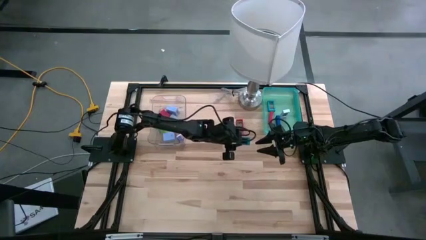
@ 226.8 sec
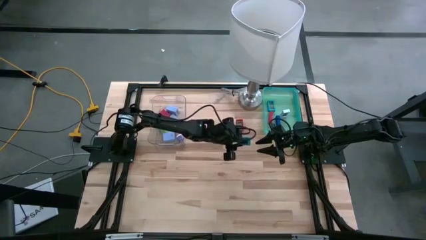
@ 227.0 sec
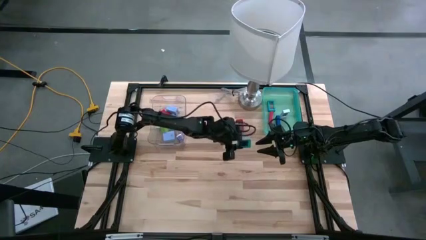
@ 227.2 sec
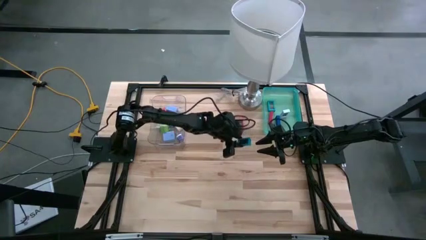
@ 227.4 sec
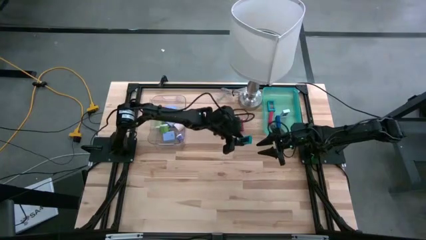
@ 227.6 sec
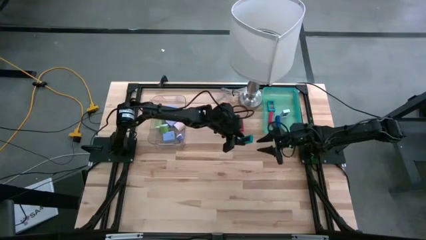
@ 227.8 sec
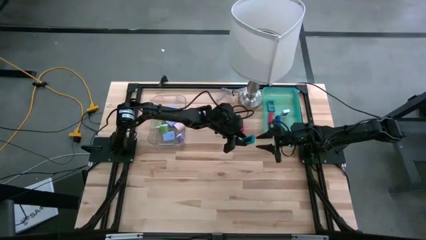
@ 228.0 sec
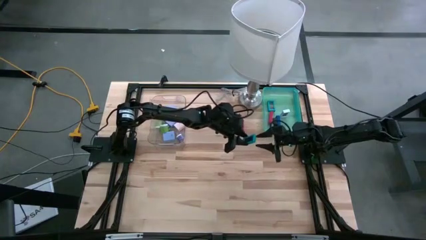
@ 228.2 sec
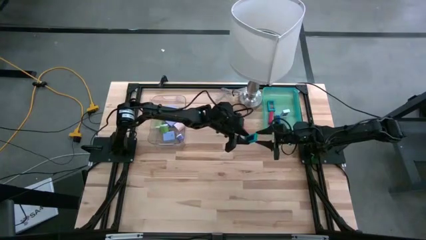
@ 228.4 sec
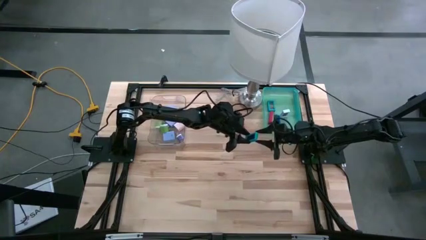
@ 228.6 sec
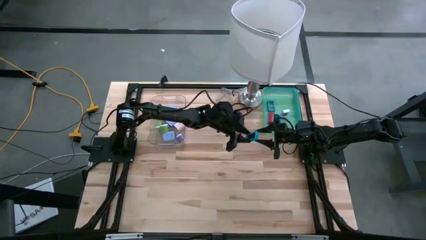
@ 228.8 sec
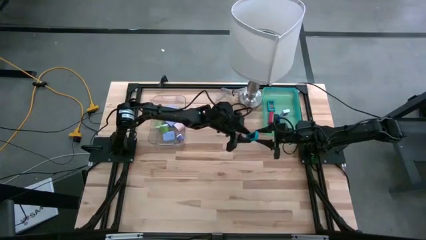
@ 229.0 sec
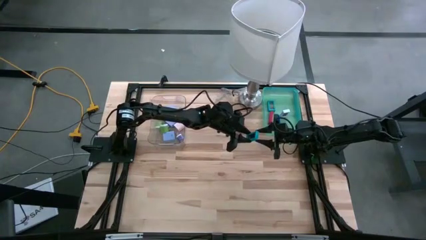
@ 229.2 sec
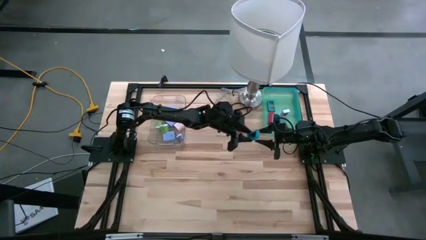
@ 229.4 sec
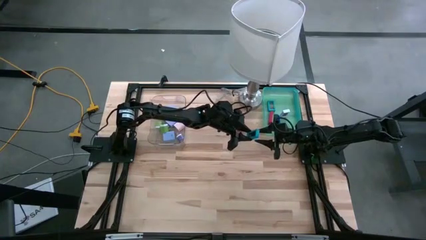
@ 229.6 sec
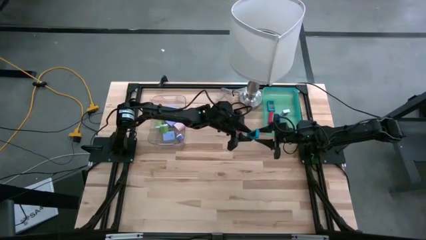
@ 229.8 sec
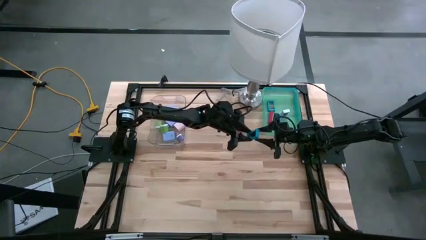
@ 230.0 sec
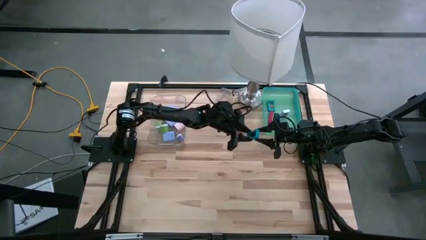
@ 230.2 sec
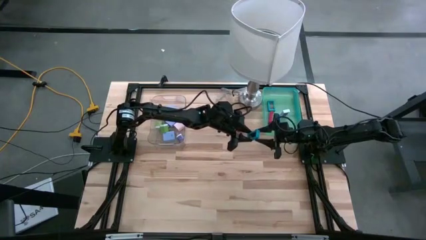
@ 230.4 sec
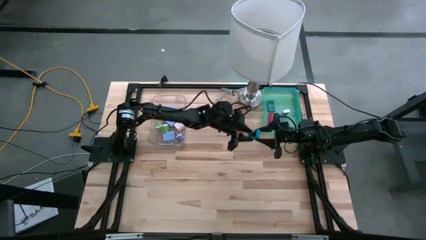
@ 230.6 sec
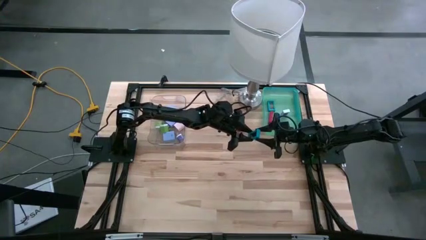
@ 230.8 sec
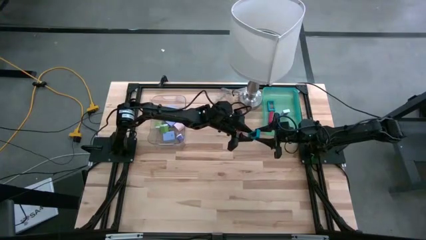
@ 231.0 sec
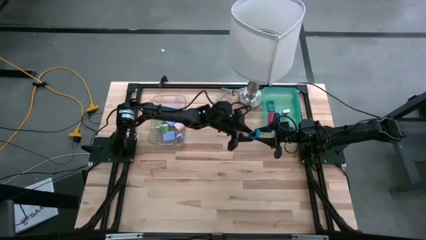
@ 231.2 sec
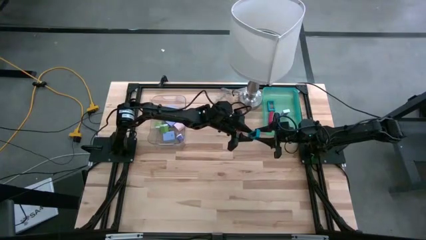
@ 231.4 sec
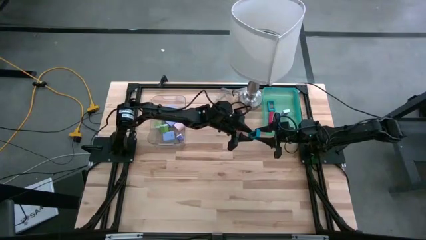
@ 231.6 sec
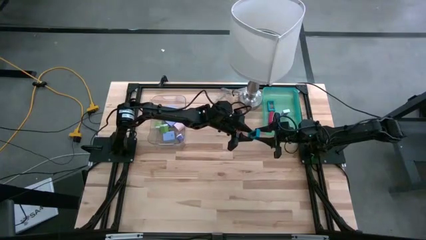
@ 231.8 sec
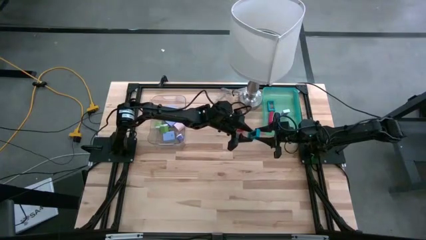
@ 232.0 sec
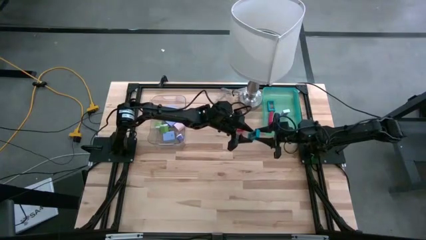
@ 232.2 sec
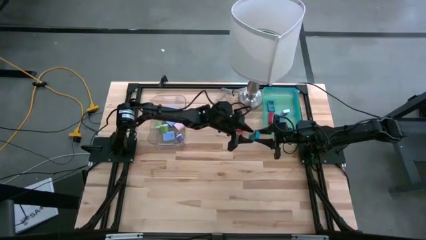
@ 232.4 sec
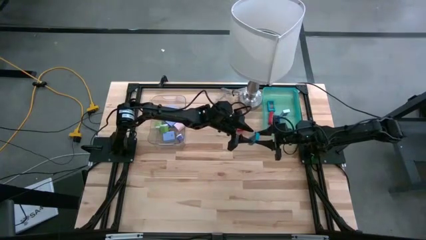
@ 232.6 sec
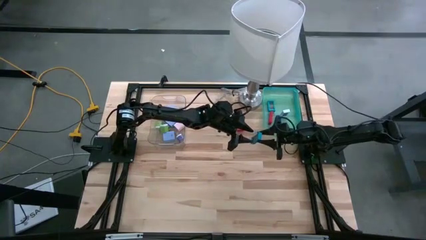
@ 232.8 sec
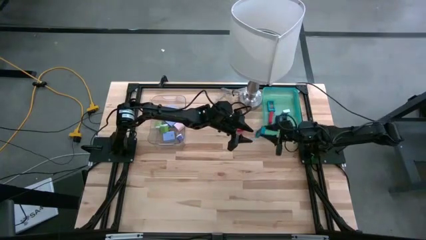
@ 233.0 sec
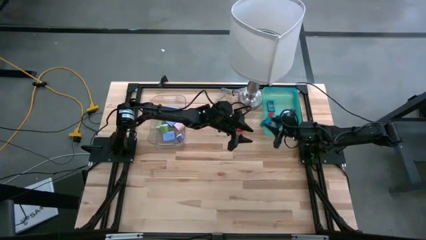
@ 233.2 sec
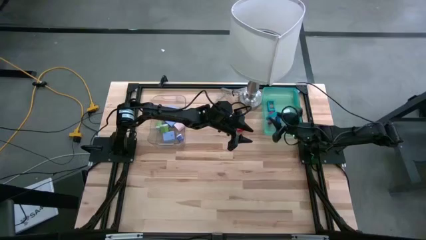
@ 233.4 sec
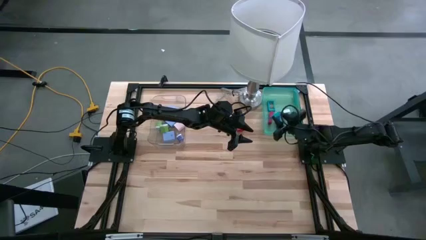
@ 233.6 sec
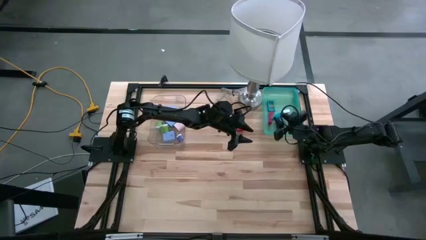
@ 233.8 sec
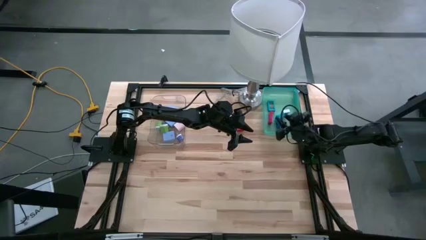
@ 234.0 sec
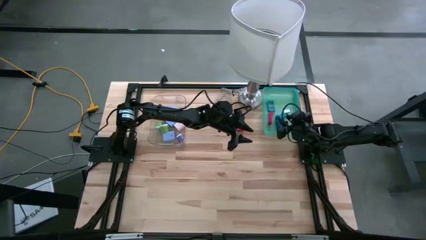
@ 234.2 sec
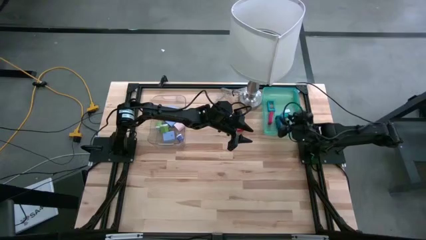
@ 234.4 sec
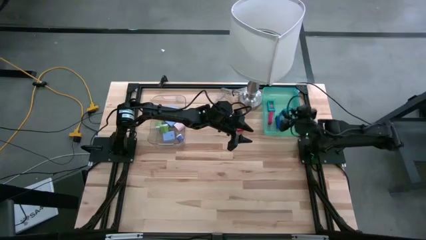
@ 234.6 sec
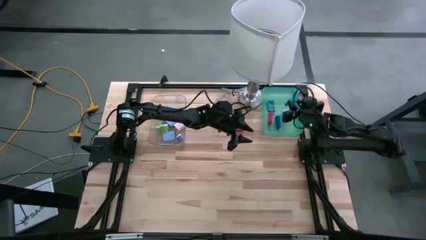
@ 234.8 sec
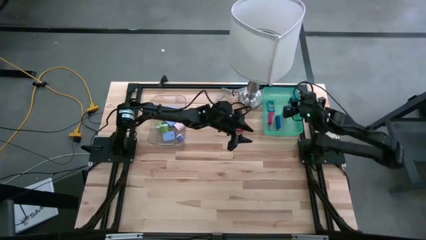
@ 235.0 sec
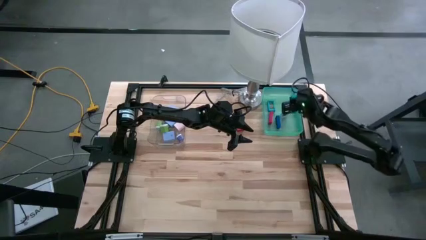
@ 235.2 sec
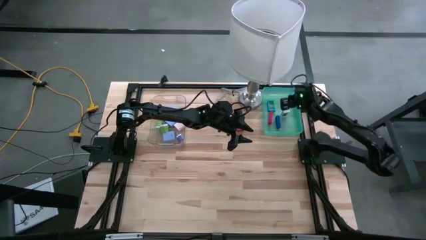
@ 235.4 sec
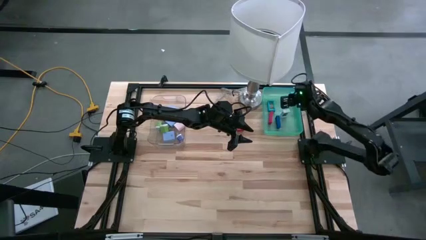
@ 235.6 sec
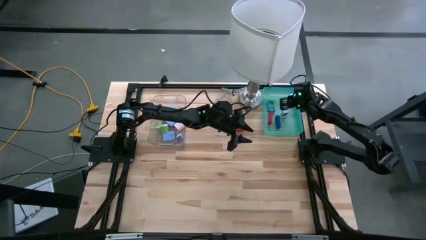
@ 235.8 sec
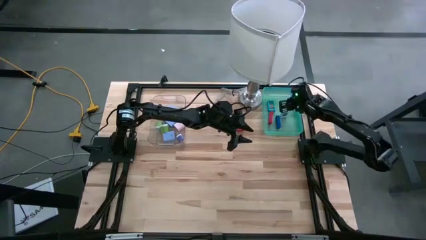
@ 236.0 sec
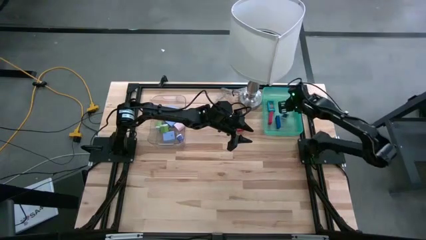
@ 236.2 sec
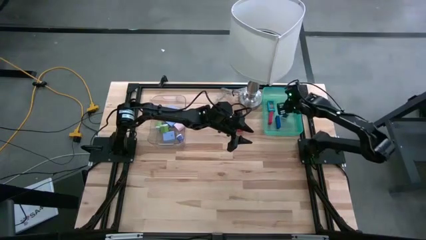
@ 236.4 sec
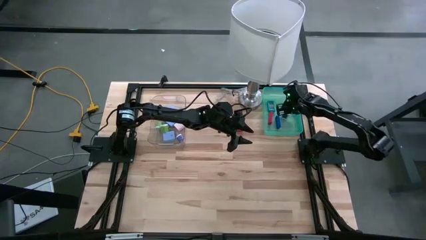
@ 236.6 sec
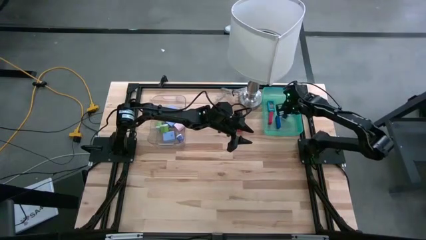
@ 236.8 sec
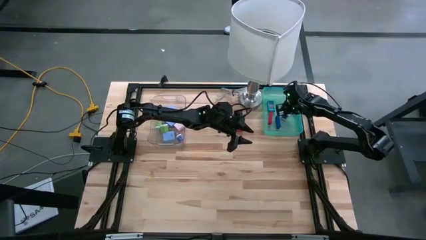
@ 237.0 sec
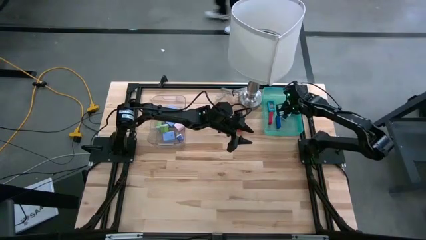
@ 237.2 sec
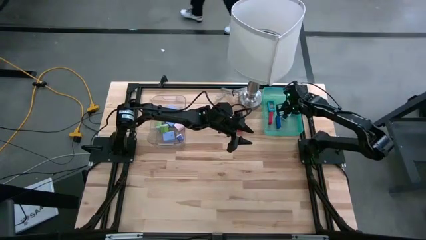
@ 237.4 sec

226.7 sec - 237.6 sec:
Task: Pick & Place Office items
Put the light blue mini digital clock into the light blue bin

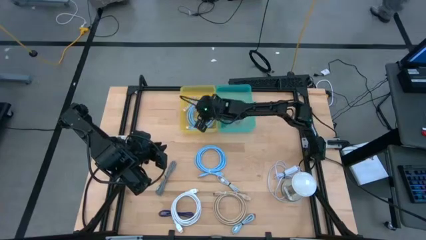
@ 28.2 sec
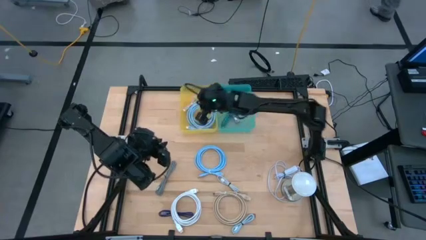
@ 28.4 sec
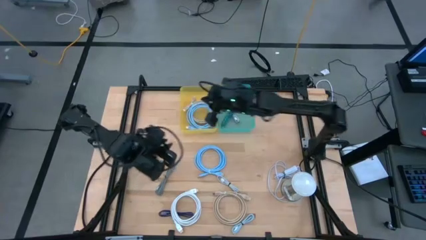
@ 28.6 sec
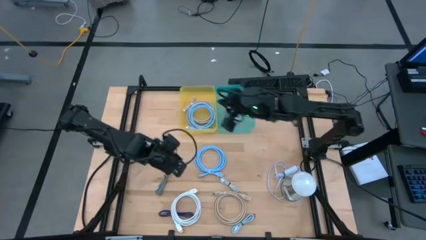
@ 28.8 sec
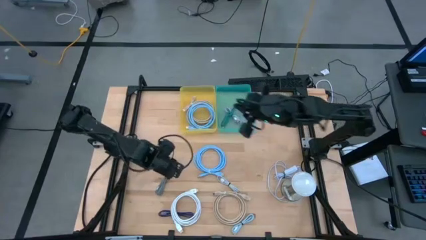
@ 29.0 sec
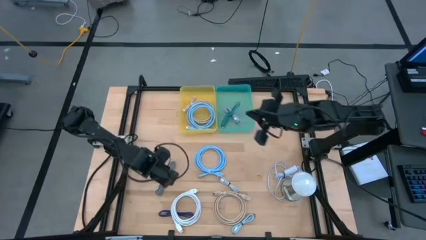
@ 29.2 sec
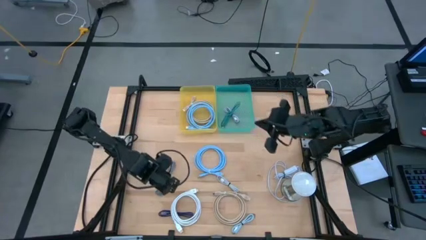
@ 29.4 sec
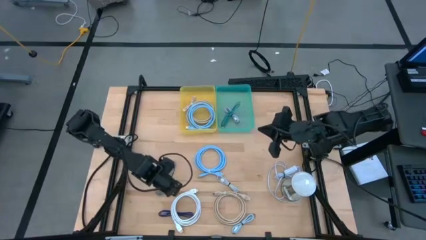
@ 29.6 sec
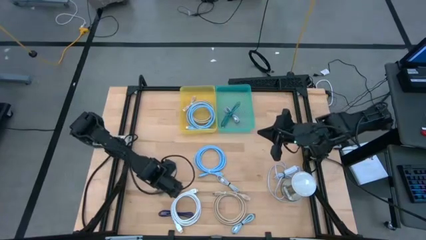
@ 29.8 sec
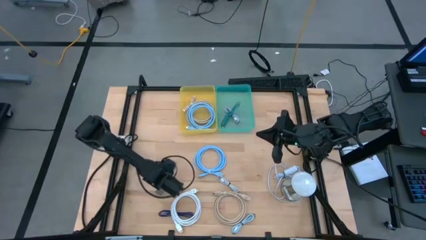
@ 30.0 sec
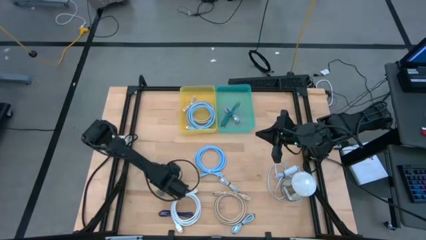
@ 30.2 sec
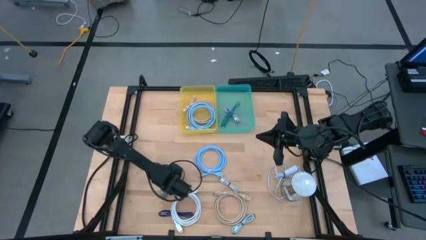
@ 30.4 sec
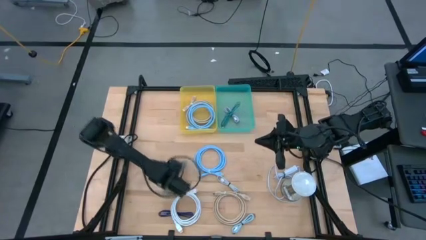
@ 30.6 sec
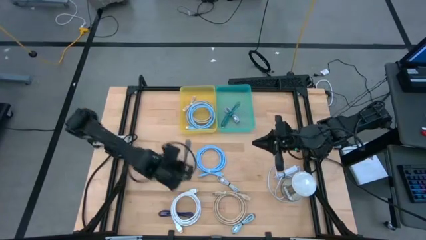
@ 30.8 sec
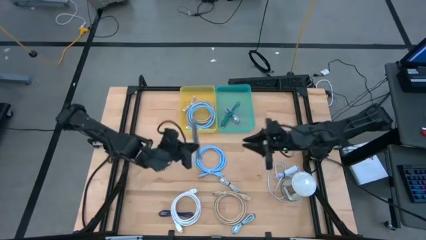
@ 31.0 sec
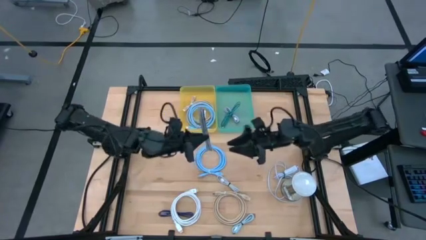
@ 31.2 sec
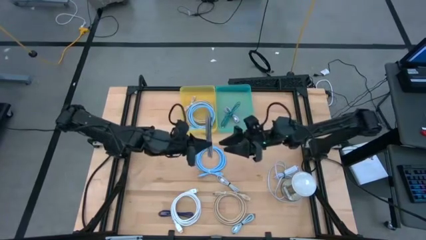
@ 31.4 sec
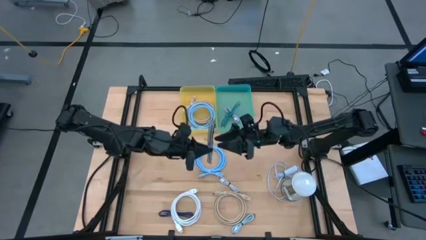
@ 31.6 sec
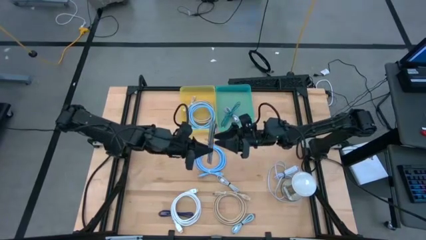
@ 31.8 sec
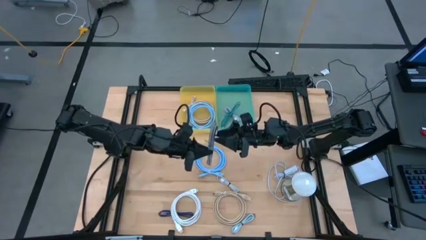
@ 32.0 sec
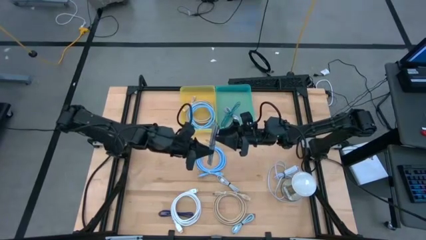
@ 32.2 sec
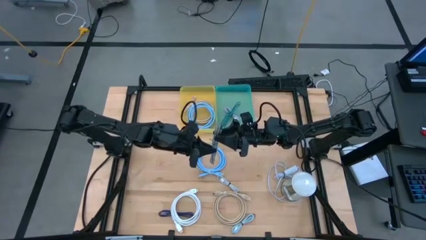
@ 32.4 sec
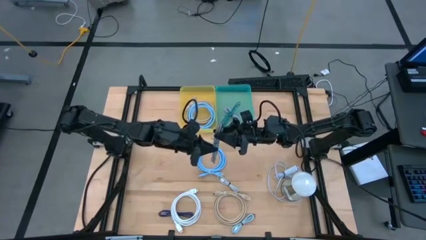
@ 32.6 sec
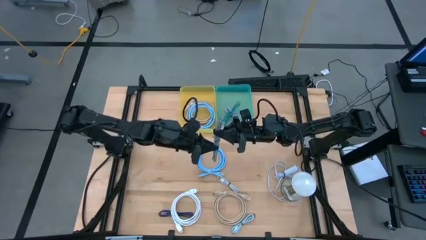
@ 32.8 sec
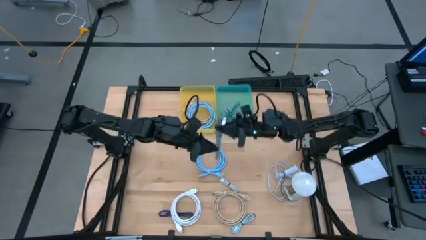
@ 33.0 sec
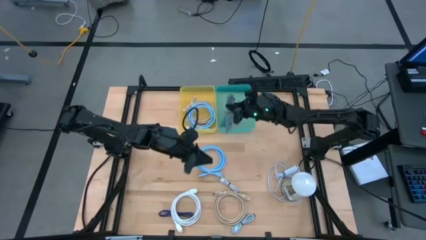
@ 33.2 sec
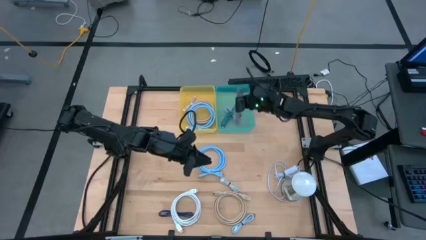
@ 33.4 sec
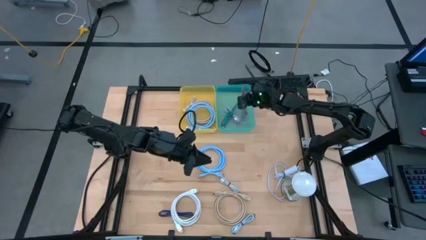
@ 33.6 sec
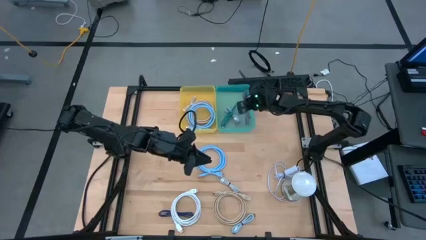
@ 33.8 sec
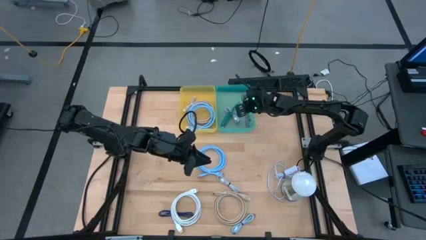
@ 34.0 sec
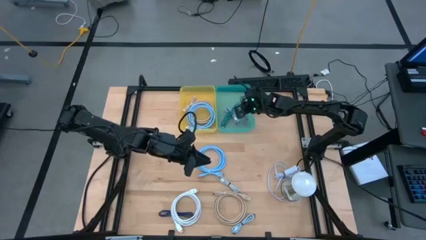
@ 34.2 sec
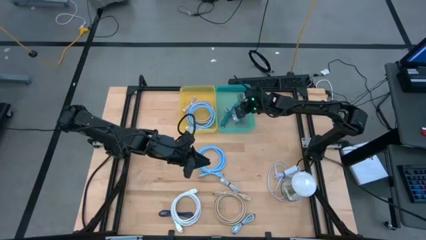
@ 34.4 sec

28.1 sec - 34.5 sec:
Task: Pick & Place USB Port
Put the black and white charger cable into the green bin
